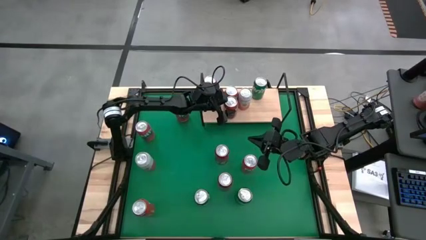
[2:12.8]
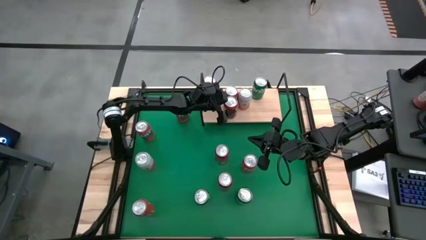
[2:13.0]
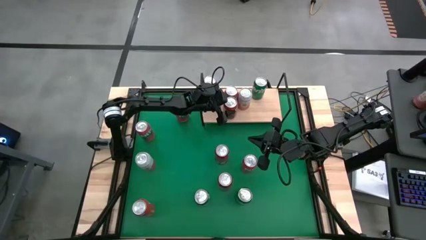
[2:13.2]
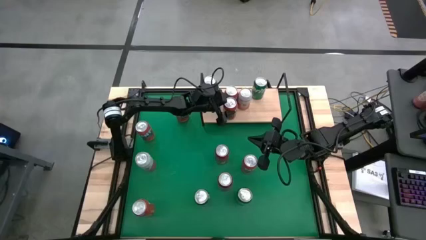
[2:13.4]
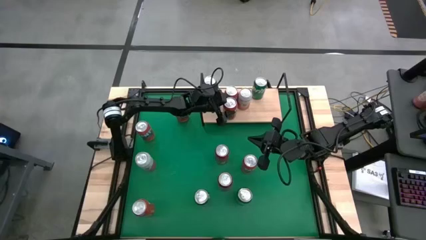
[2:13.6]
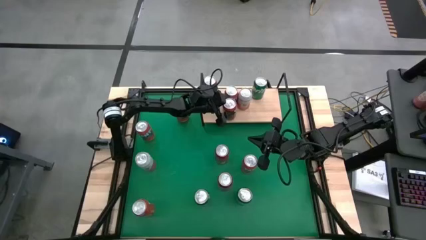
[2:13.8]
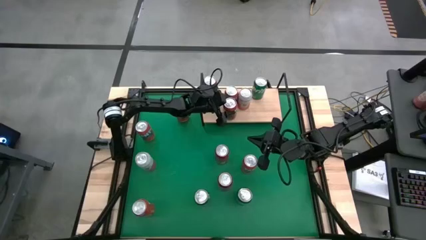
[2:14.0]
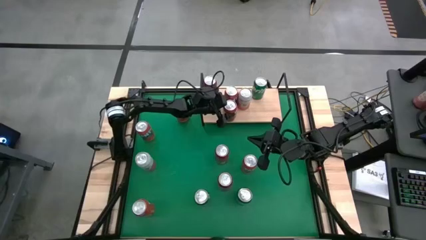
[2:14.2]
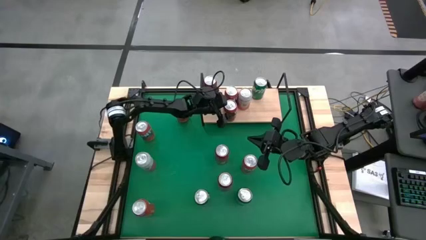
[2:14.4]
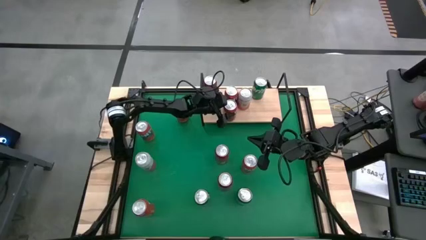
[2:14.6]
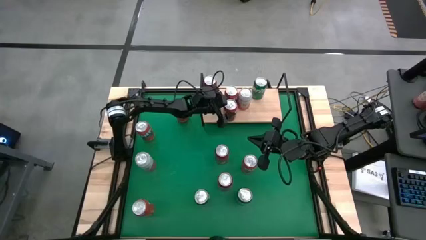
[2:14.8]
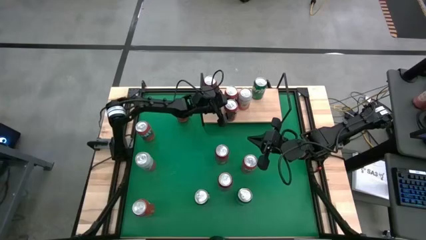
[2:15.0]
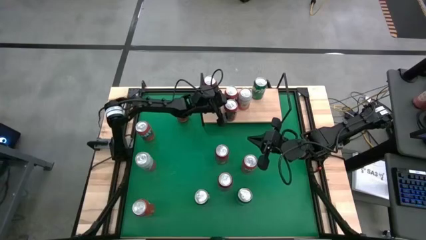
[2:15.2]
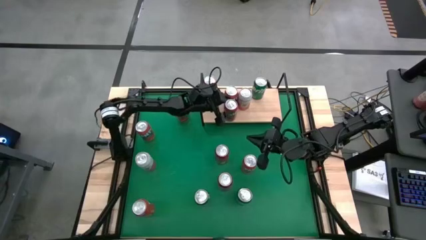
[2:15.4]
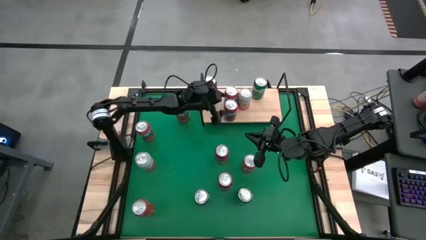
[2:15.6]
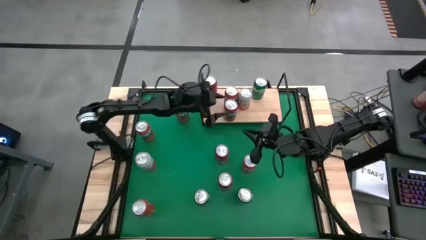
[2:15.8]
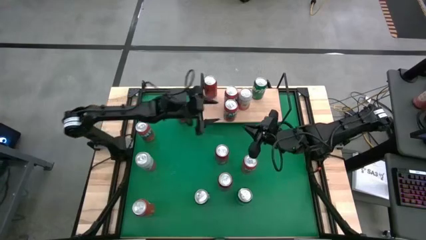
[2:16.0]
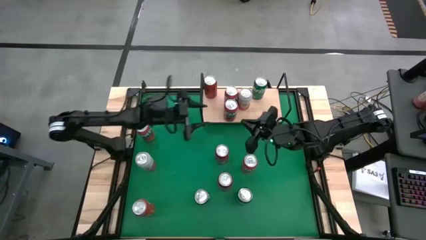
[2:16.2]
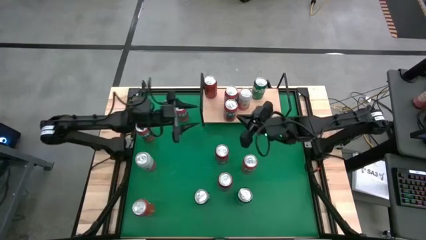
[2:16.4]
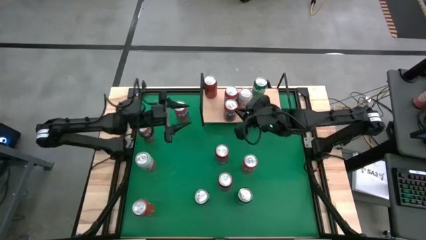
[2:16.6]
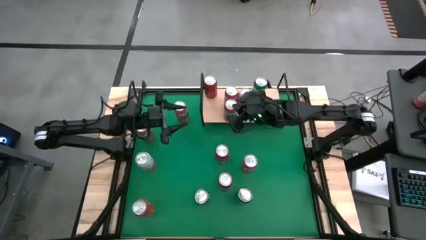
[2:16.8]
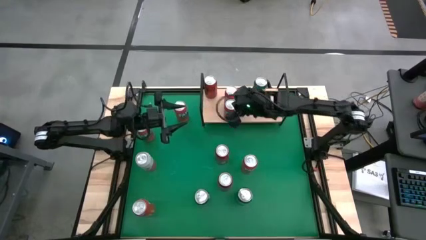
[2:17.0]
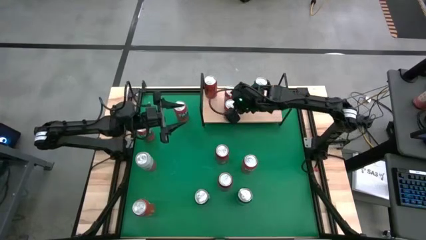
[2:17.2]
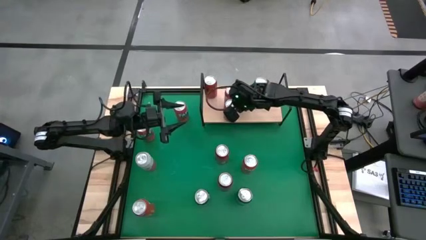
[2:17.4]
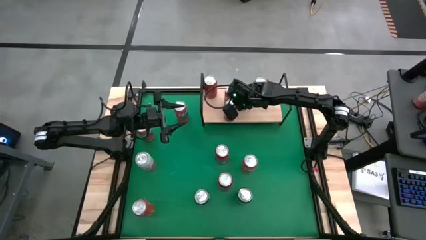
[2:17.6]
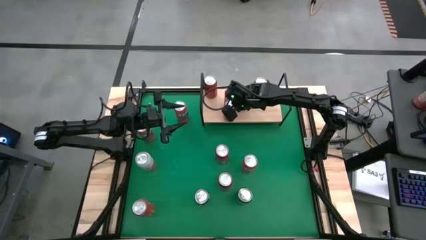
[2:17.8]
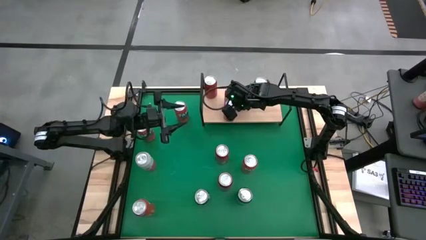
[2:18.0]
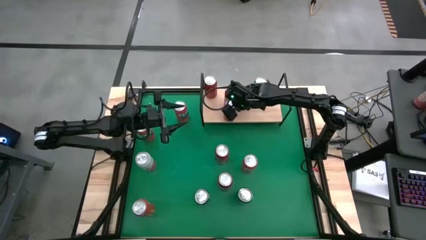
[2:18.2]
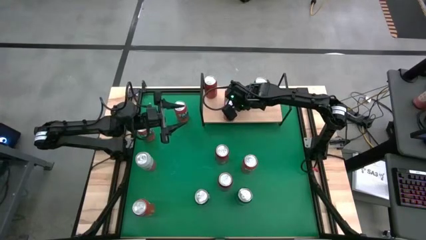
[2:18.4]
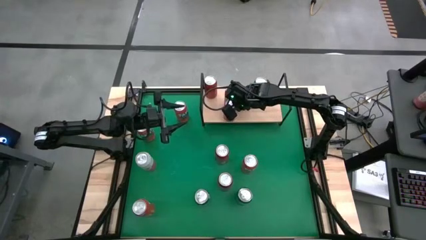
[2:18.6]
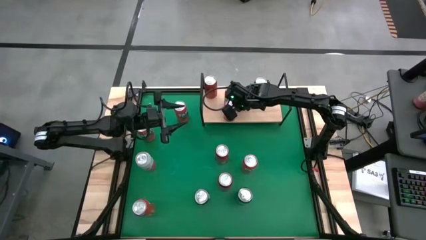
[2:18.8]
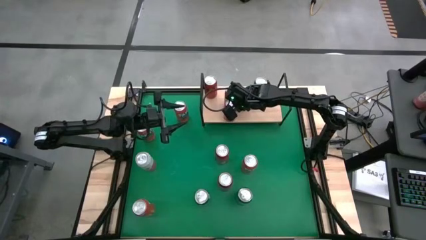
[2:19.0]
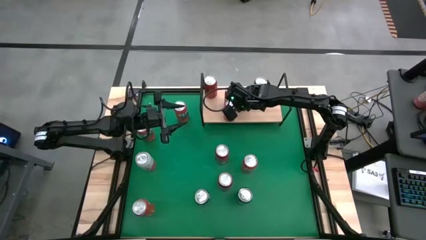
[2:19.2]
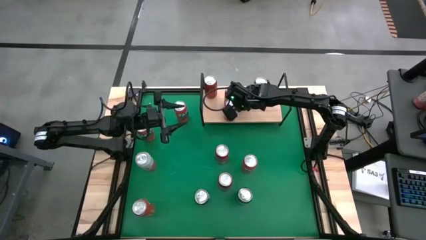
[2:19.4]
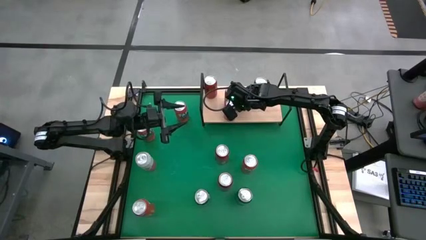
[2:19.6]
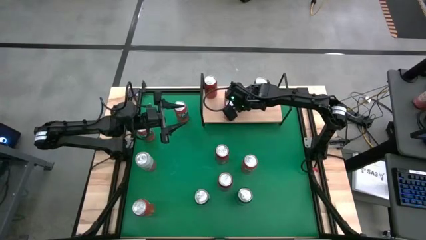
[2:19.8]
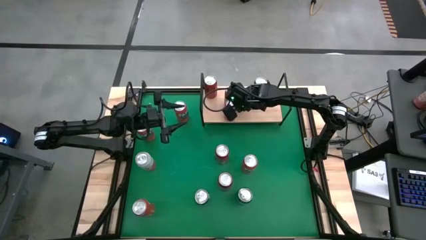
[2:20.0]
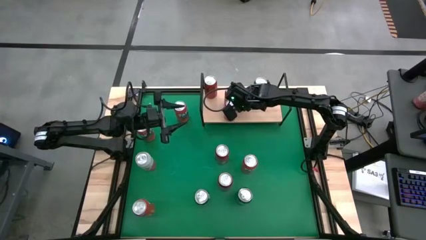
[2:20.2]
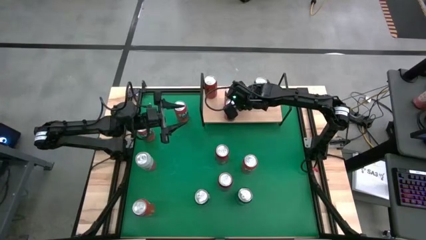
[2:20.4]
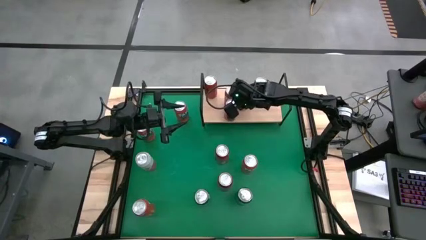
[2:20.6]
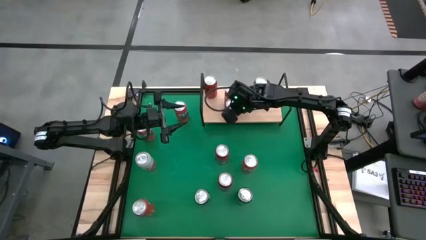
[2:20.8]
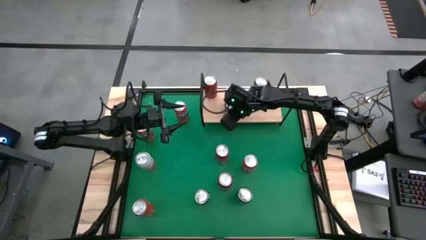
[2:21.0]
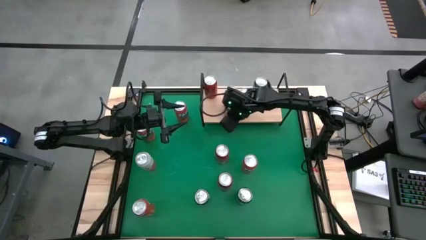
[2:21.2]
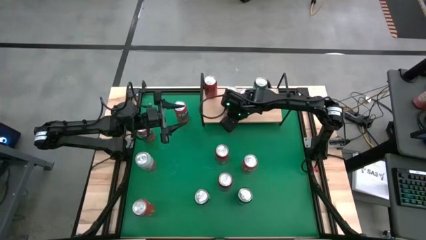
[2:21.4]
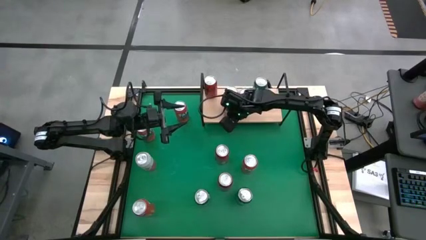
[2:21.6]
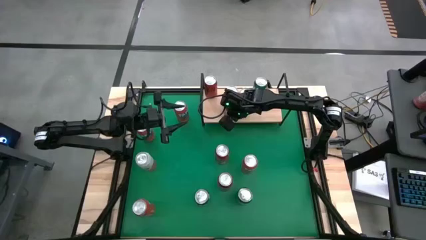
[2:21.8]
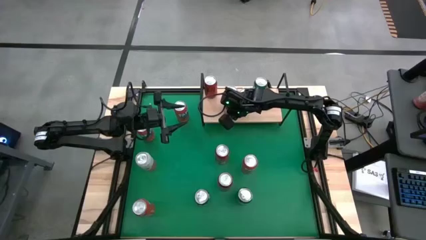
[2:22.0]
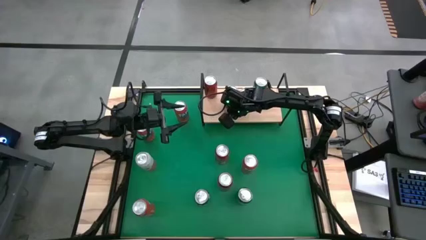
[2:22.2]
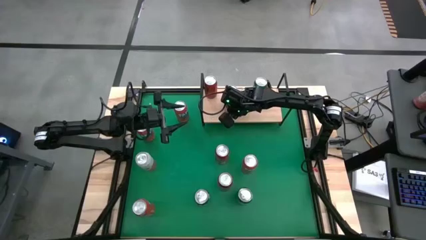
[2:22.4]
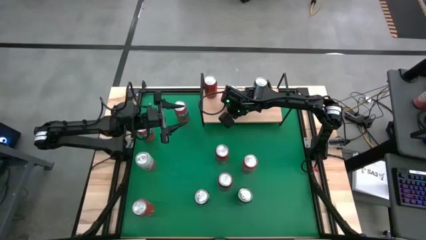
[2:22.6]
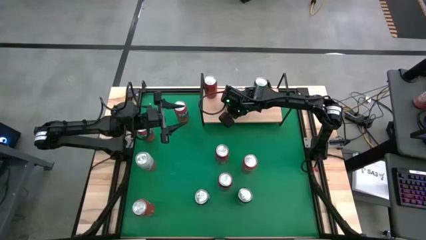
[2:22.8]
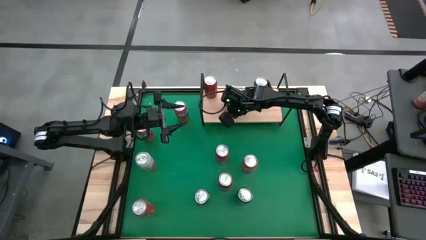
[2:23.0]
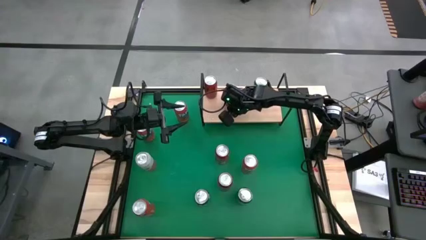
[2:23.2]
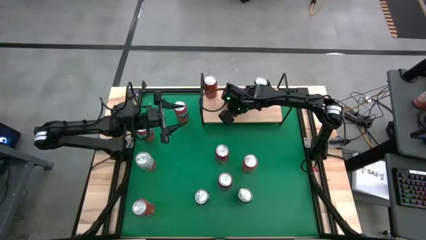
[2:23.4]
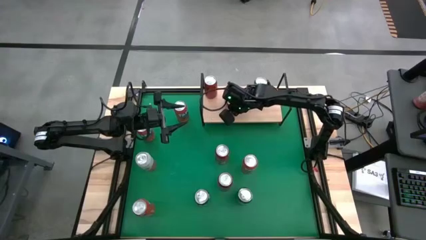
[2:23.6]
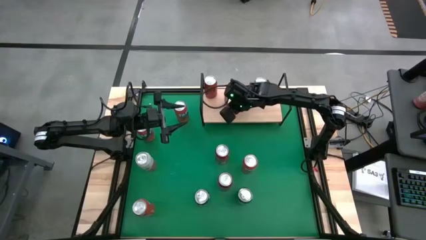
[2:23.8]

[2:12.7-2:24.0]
Task: Place canned beverage on shelf
Put the red soda can on the shelf aligned with the other red soda can

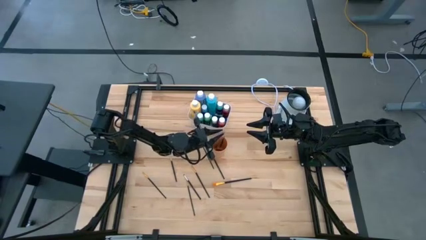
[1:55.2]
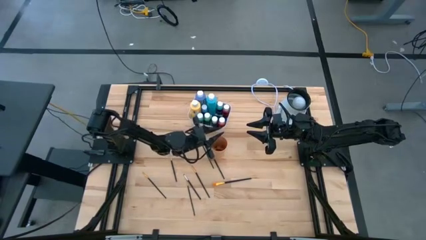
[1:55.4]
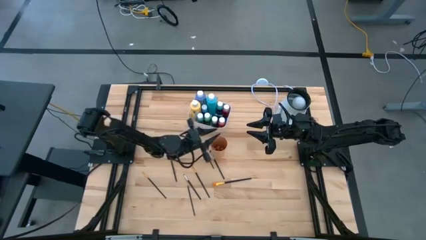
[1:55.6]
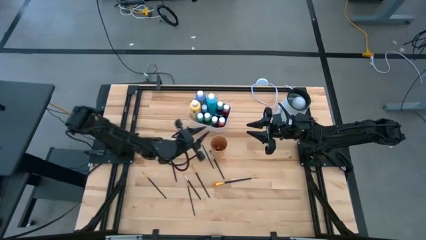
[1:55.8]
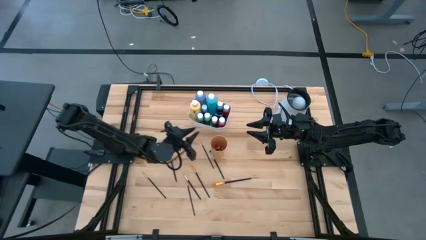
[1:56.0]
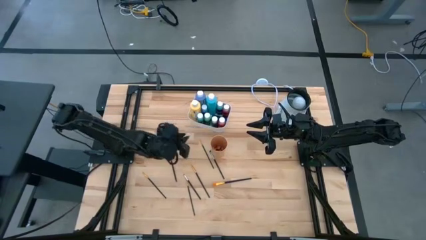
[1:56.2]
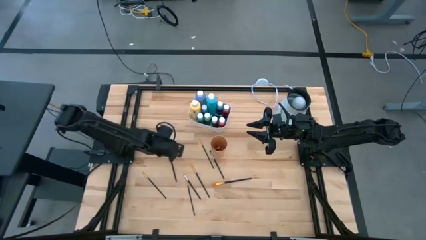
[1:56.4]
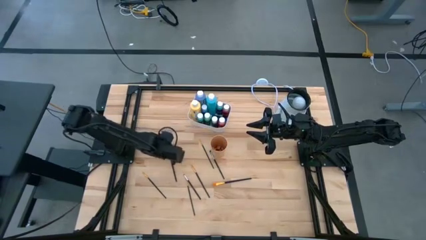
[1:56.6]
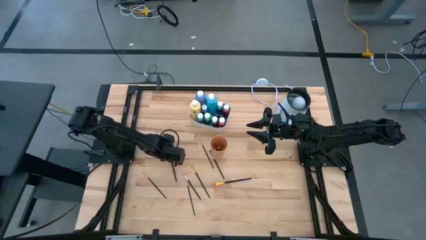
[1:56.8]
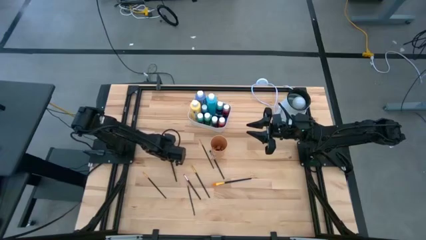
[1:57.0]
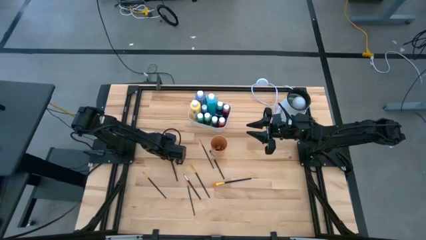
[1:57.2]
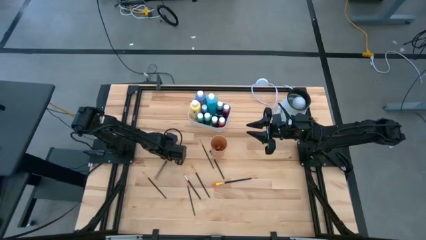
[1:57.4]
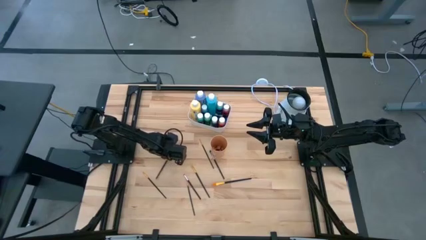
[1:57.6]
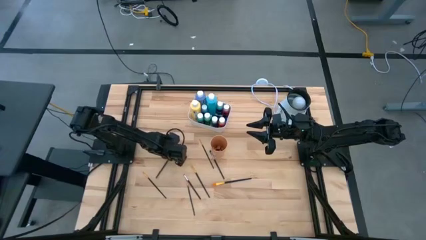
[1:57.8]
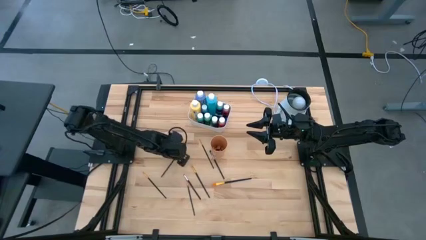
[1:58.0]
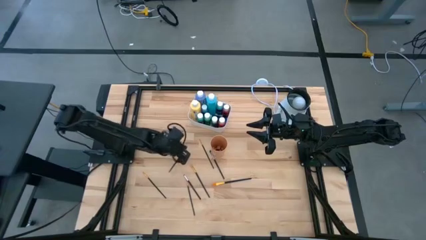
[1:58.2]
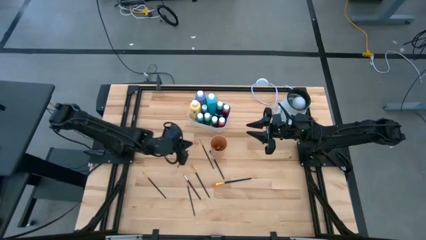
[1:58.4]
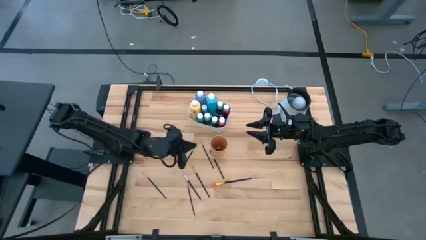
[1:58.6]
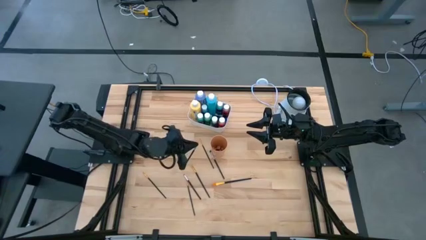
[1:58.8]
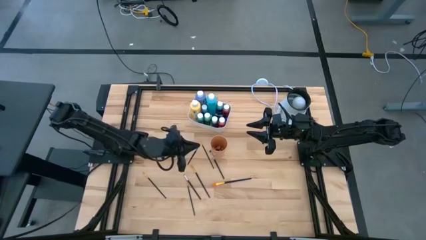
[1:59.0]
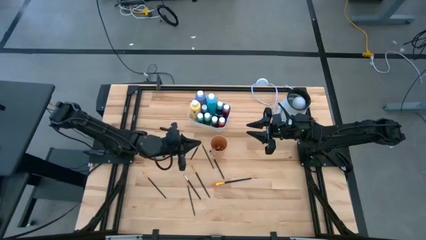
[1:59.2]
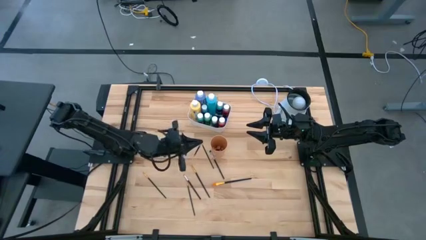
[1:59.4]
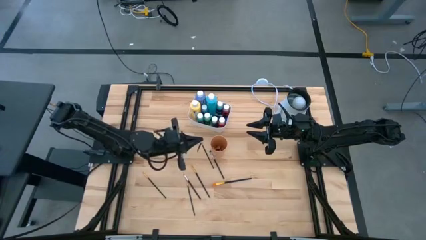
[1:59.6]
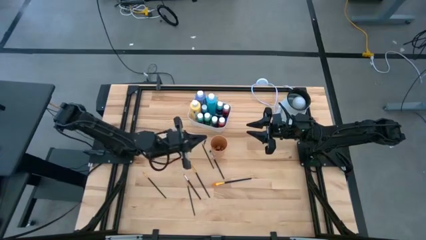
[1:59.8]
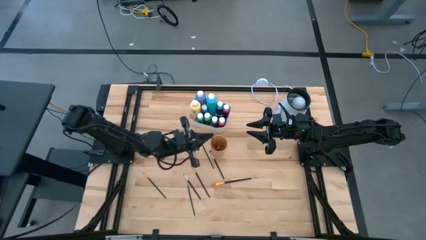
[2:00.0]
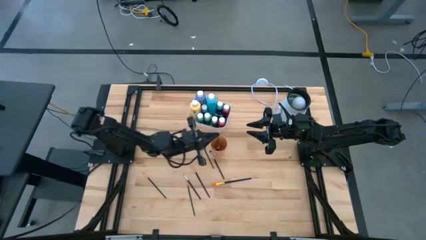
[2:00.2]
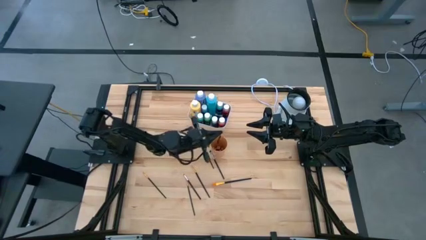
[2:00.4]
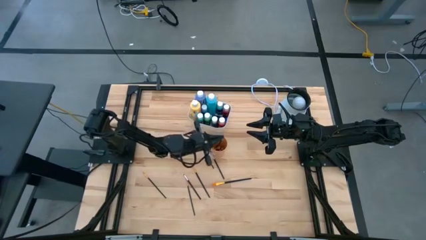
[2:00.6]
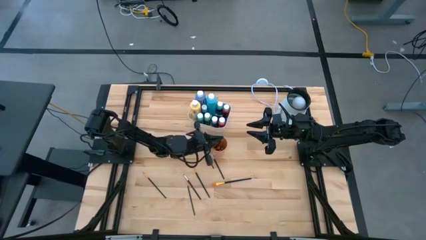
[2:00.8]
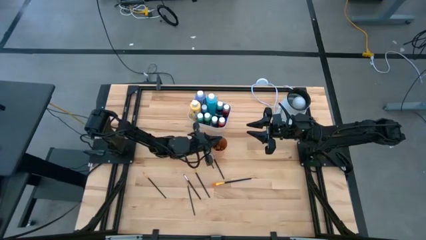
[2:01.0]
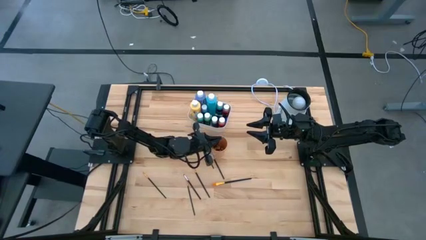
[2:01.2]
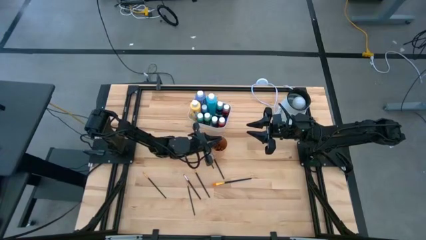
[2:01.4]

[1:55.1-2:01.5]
Task: Pick & Place Paint Supplies
Put the black paint brush into the orange cup
